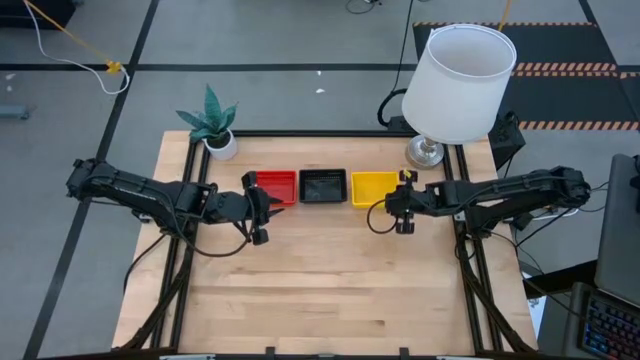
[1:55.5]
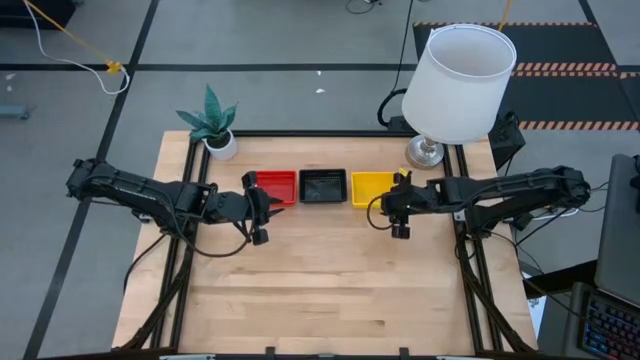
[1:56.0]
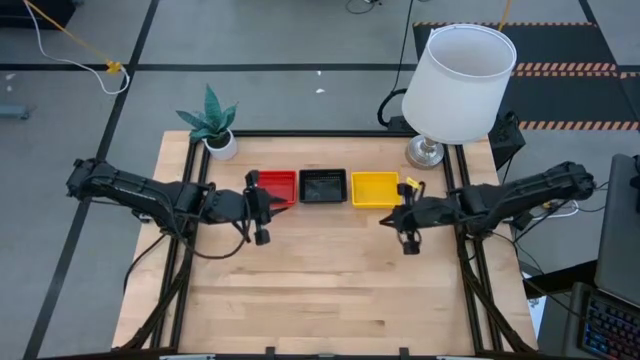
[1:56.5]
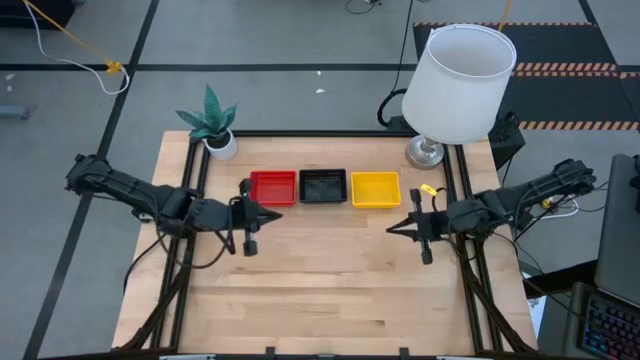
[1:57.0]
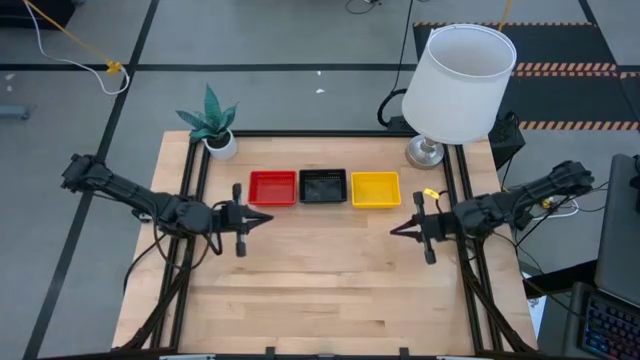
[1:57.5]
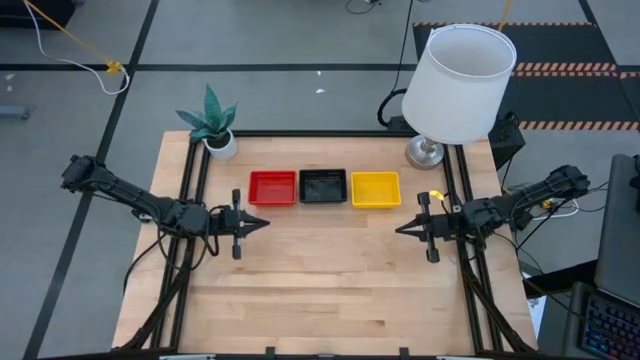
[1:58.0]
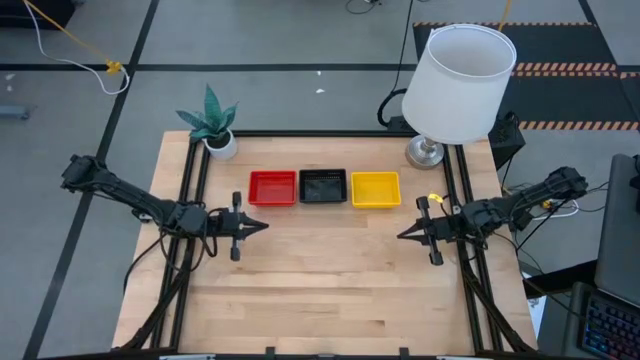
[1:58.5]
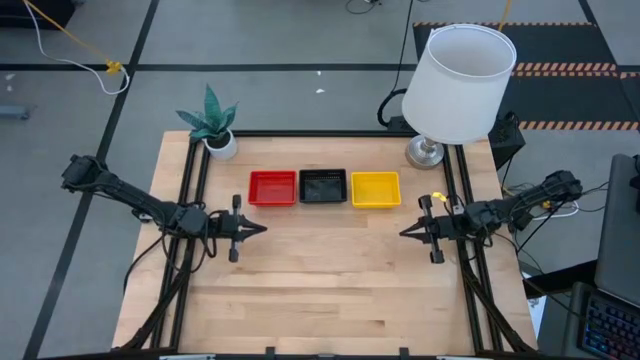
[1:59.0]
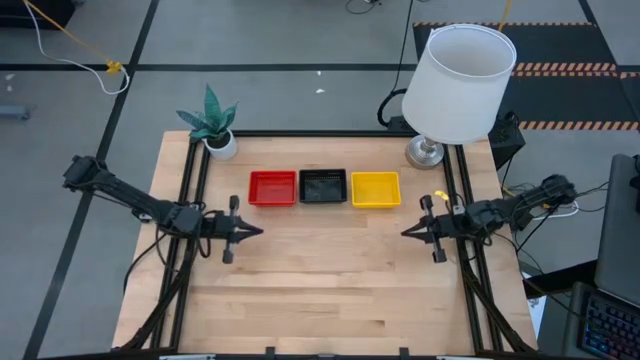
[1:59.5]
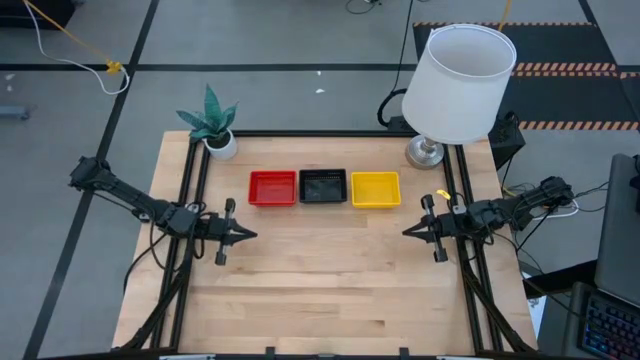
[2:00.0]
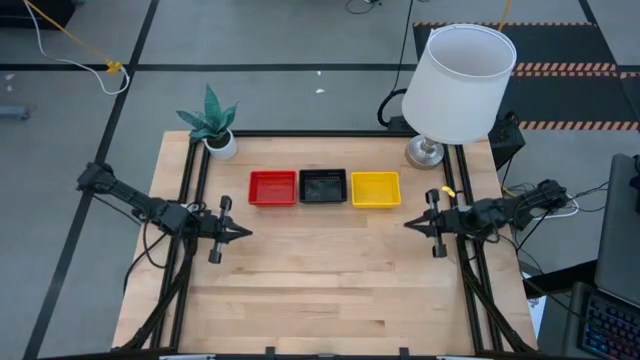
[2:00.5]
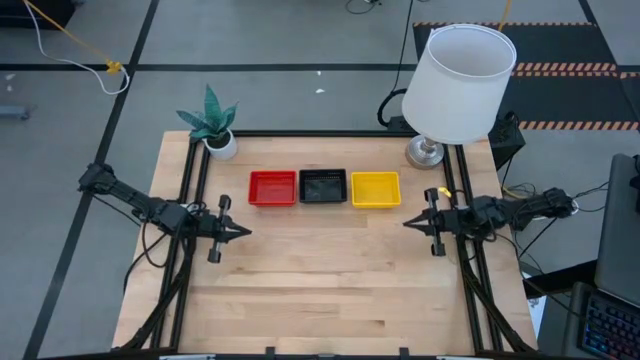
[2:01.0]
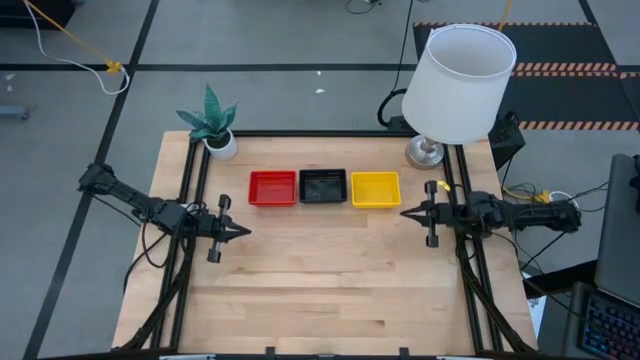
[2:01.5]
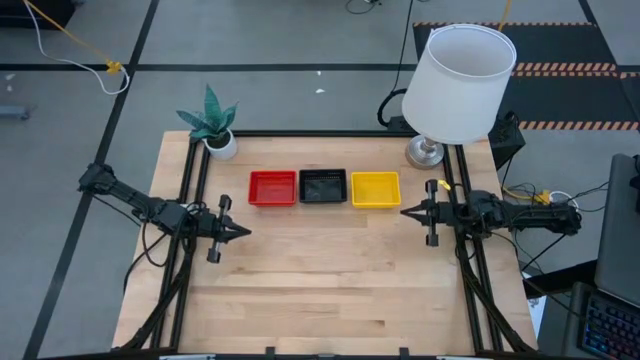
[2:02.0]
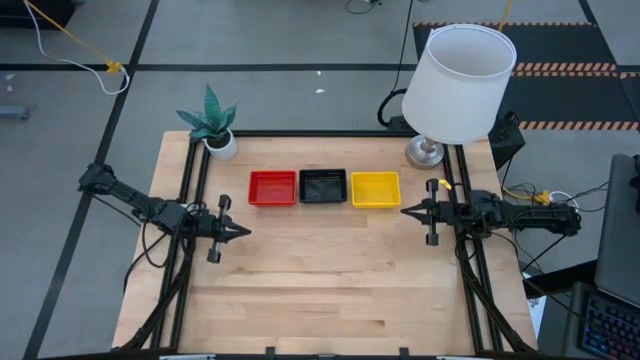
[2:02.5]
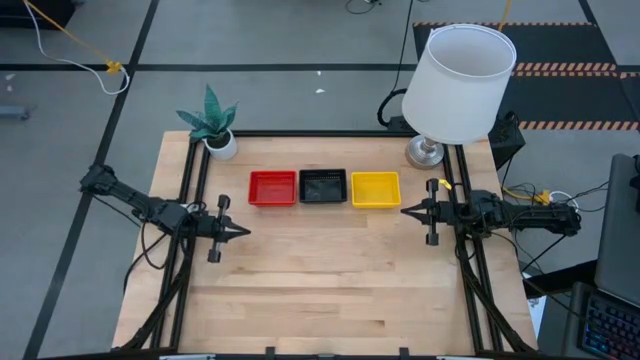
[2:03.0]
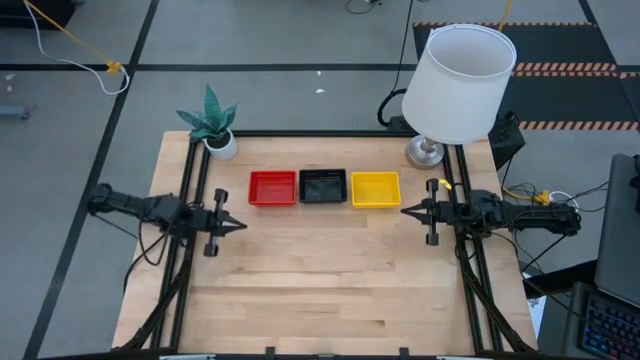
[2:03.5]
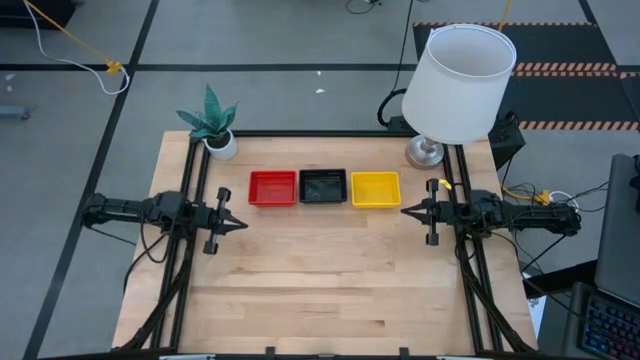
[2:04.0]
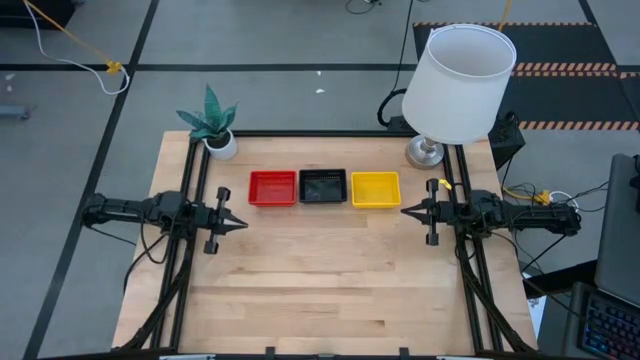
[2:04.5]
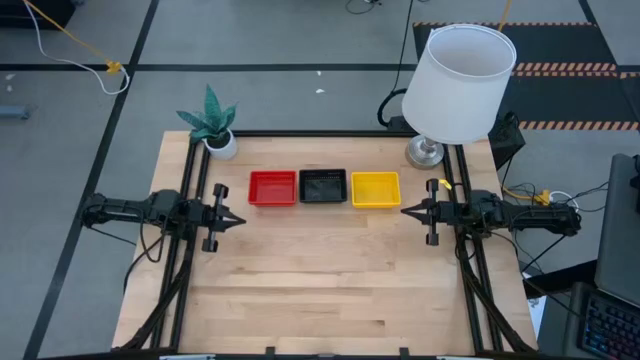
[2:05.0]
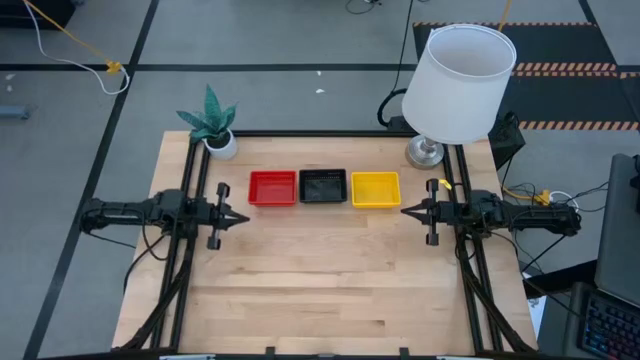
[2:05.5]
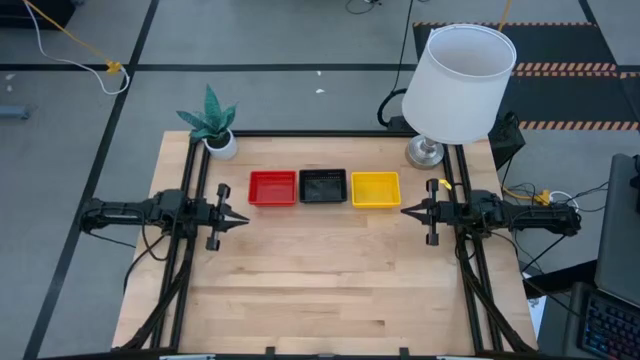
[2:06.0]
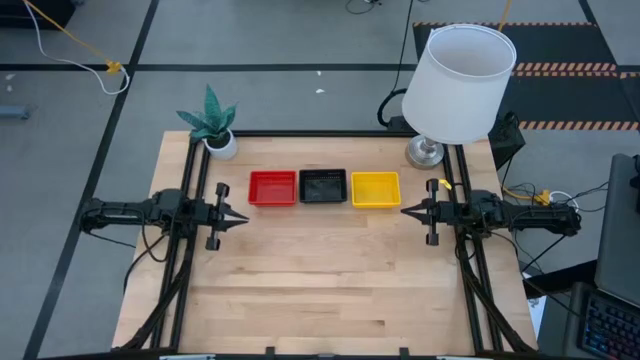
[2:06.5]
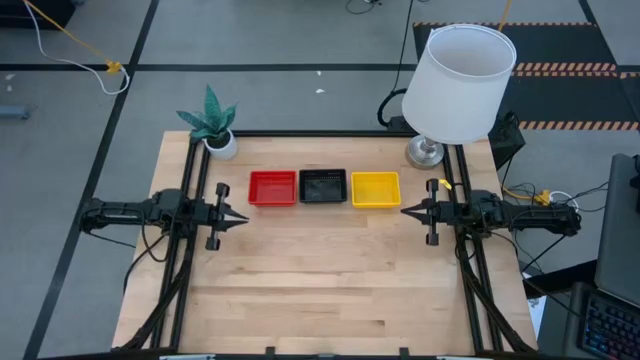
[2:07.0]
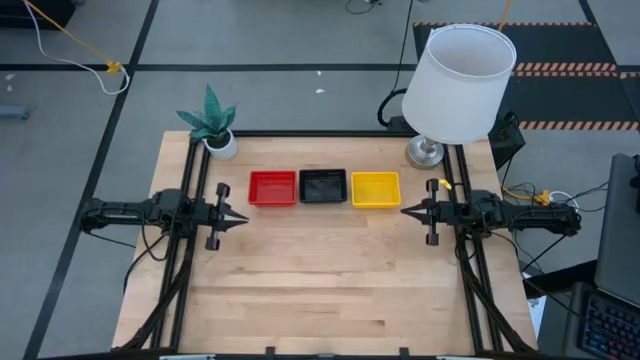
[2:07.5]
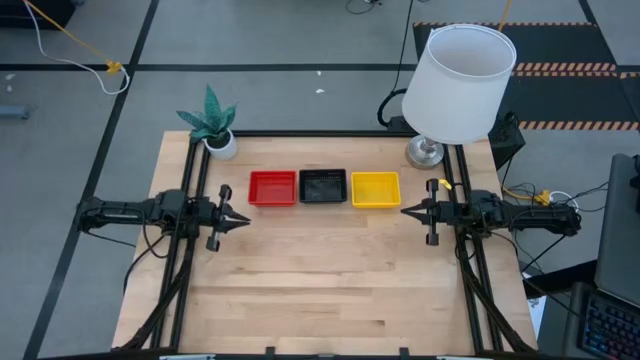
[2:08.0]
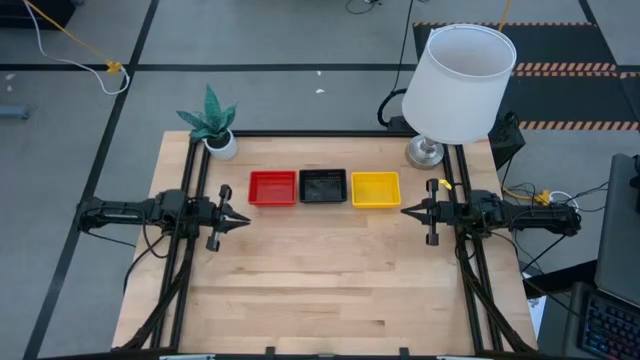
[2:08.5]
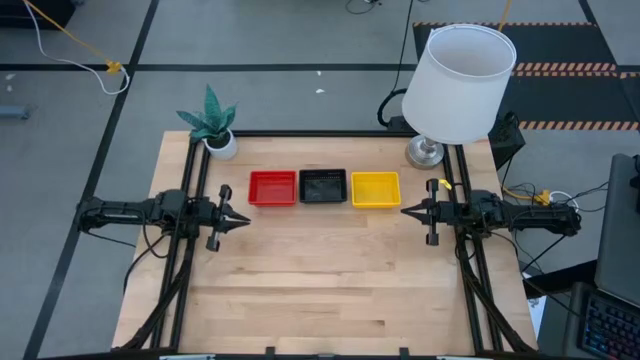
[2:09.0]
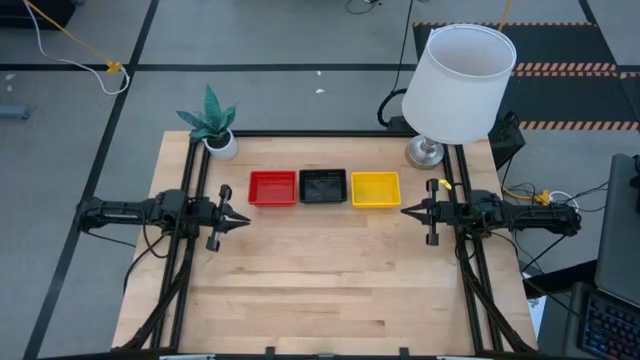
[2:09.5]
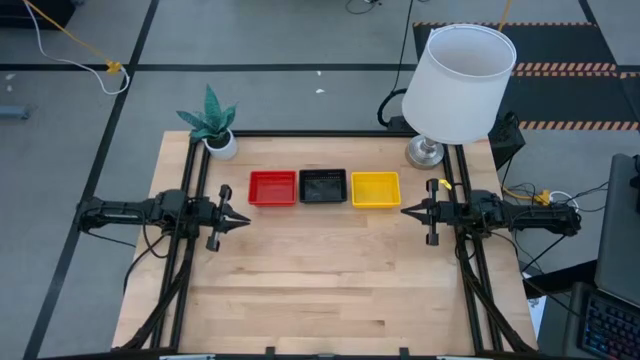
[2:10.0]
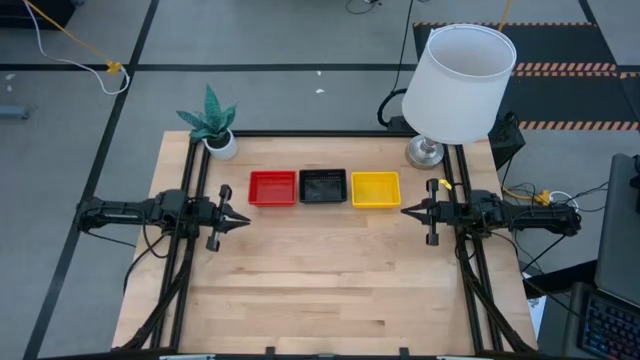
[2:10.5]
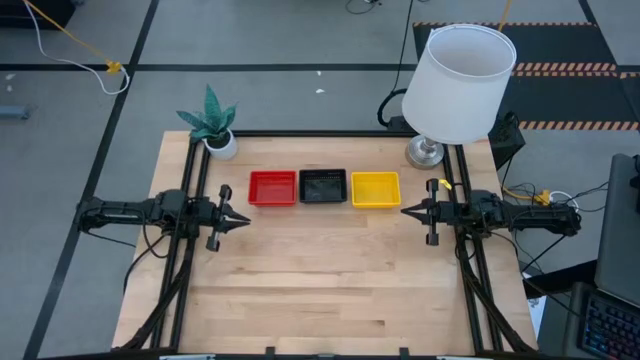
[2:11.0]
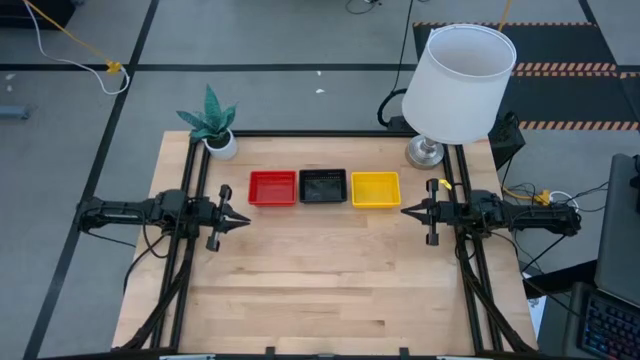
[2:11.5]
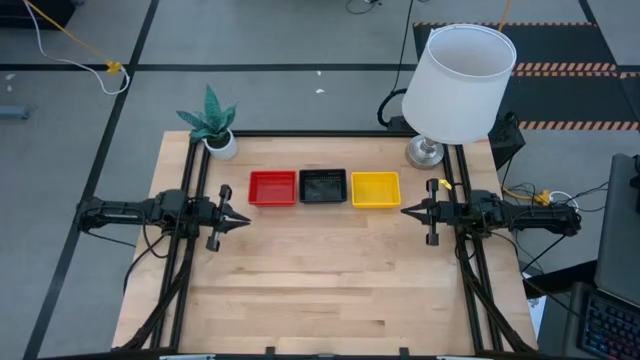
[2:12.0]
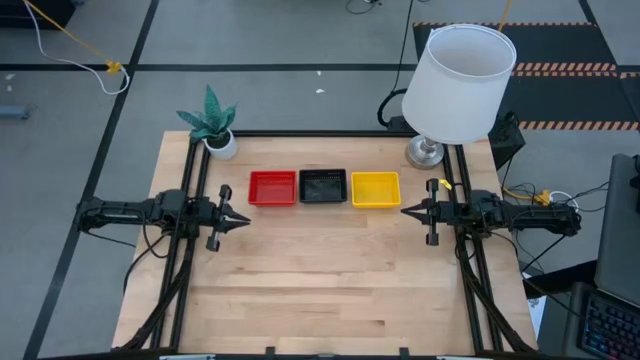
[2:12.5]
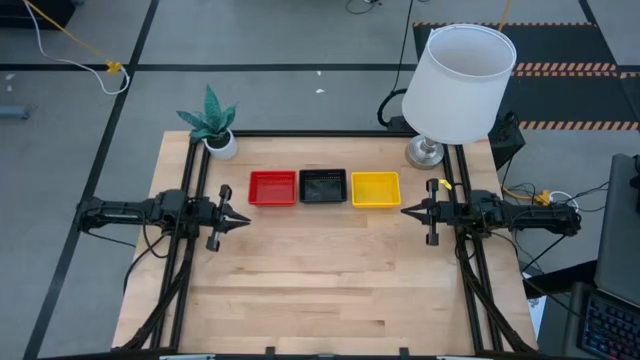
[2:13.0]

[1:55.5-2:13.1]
Return to Home Position
